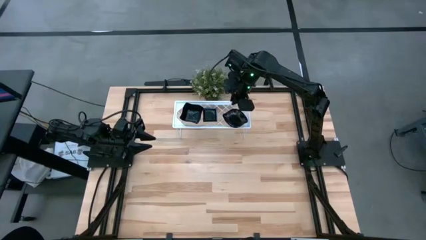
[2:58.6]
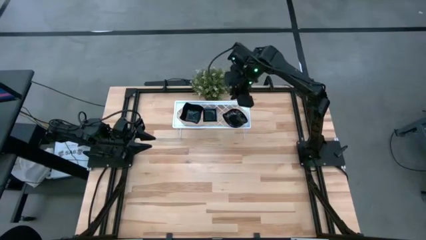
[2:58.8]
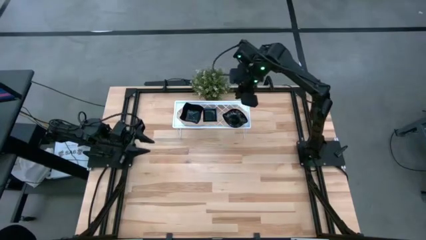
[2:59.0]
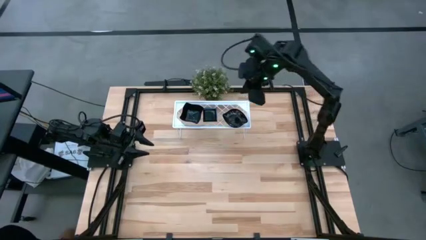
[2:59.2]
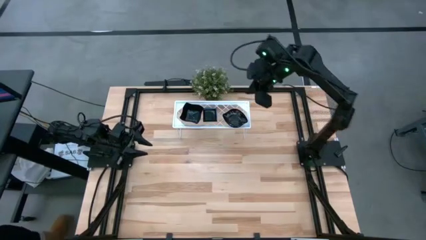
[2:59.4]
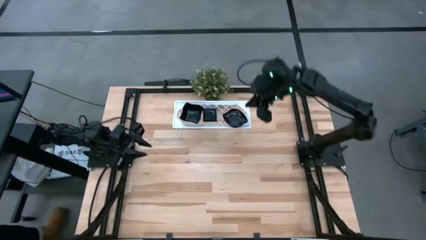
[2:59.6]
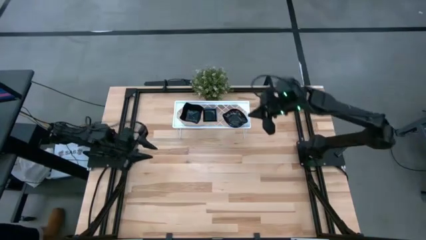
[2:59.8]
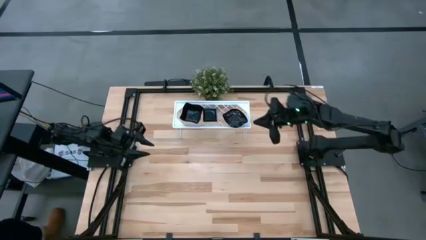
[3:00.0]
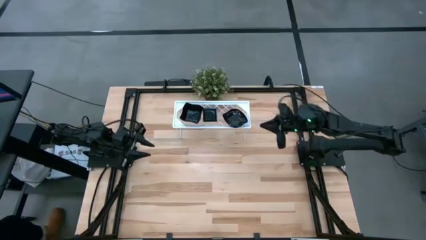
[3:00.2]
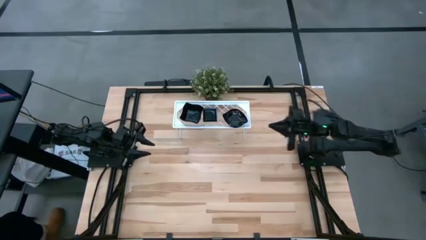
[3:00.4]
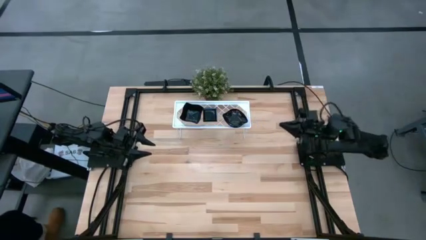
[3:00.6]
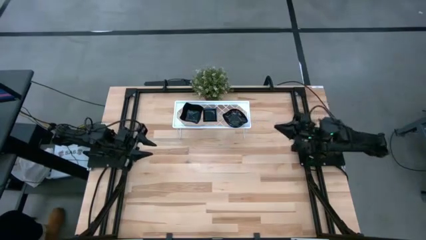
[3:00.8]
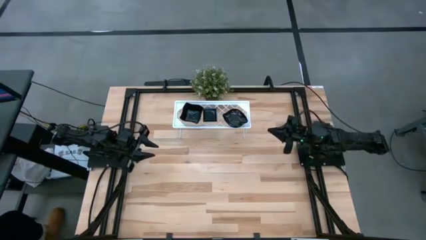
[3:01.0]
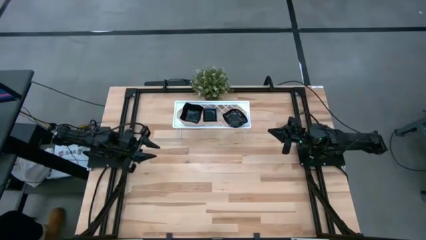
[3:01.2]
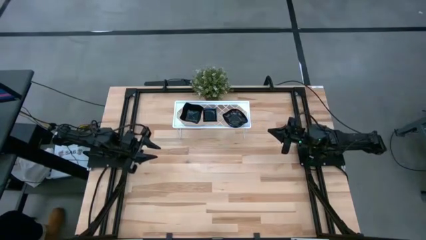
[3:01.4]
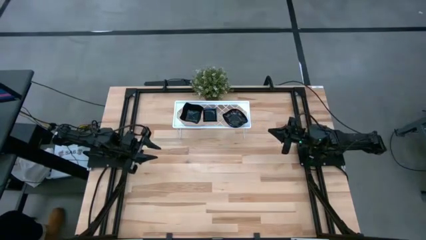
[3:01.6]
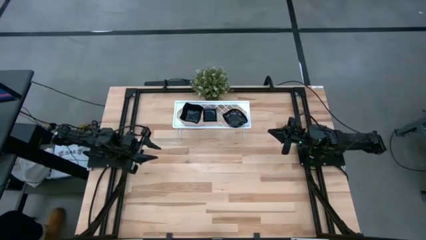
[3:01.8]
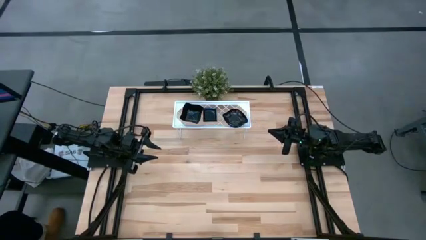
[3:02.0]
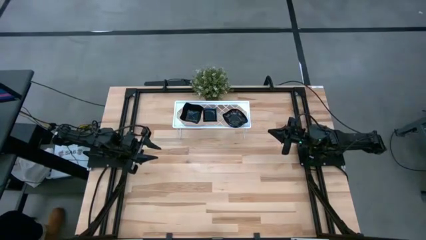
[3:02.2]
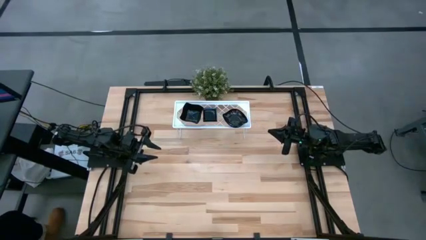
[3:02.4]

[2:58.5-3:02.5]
Task: Pick & Place Mini shaped plates
Return to Home Position

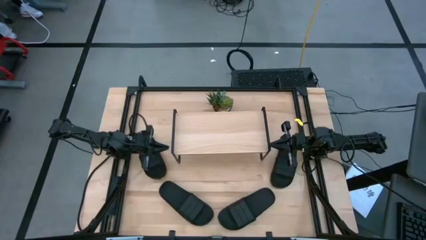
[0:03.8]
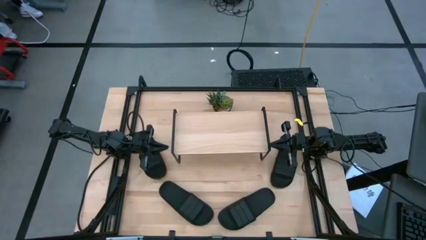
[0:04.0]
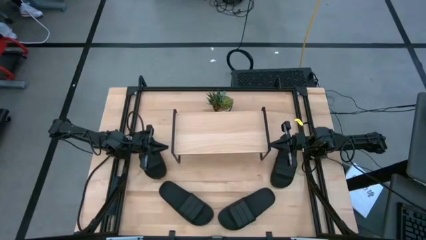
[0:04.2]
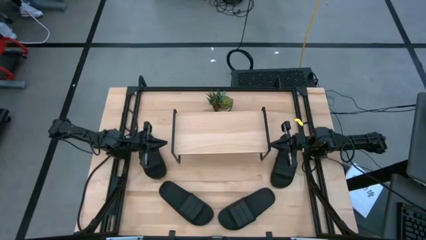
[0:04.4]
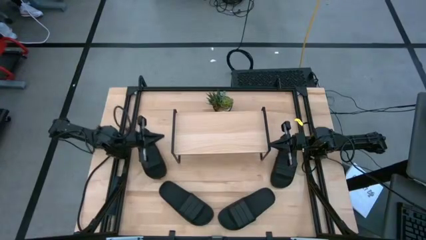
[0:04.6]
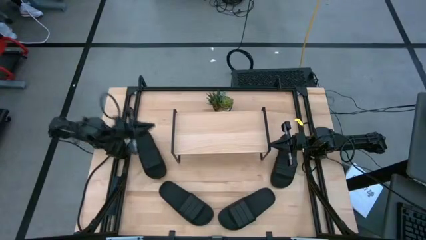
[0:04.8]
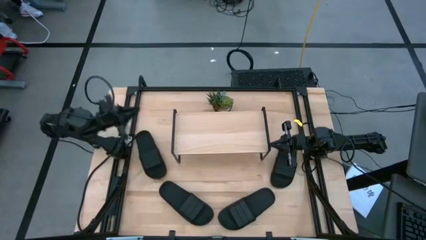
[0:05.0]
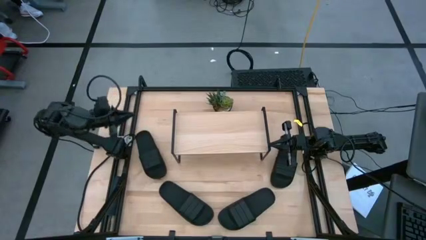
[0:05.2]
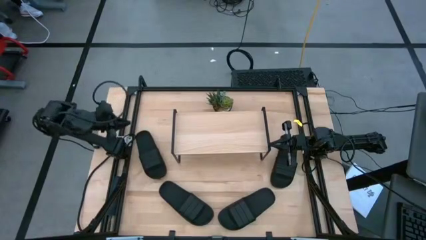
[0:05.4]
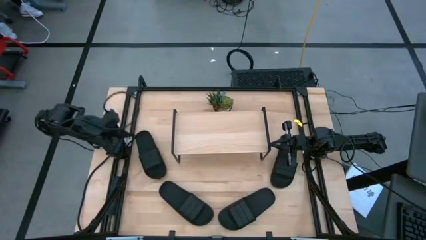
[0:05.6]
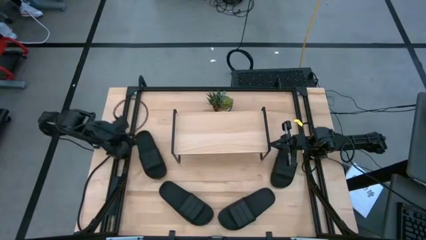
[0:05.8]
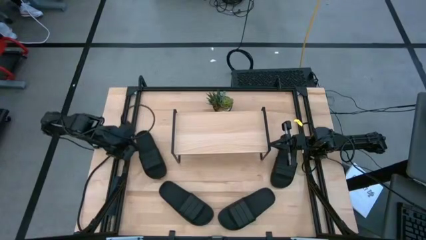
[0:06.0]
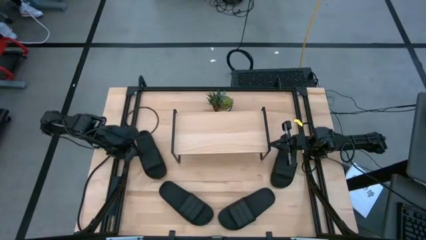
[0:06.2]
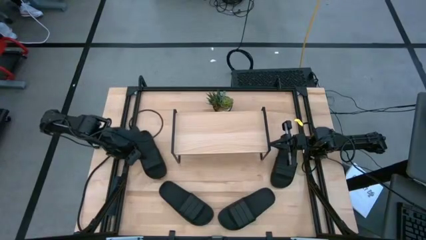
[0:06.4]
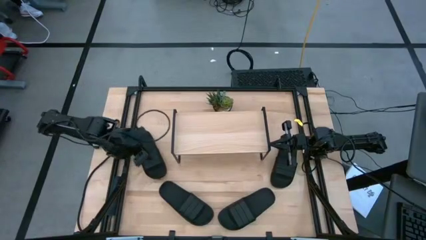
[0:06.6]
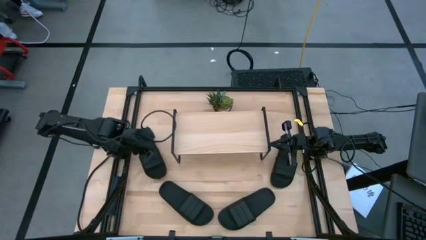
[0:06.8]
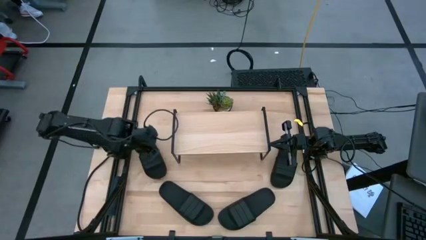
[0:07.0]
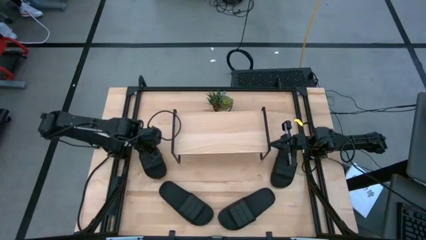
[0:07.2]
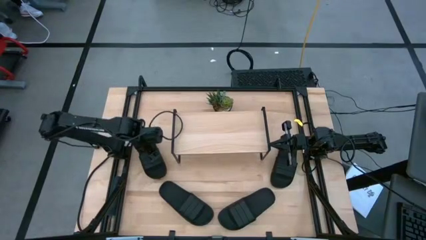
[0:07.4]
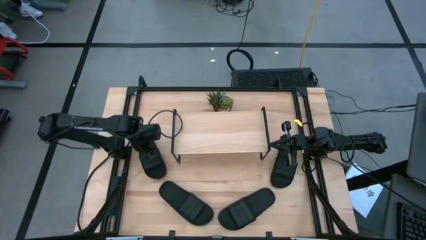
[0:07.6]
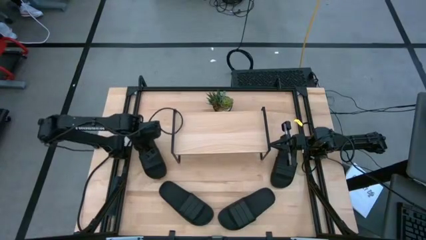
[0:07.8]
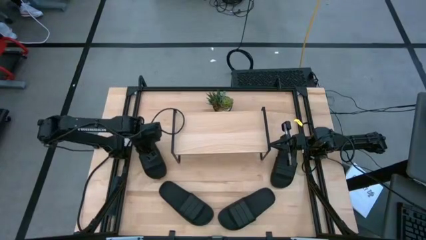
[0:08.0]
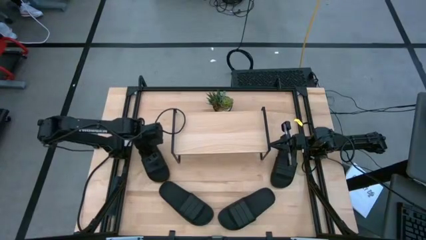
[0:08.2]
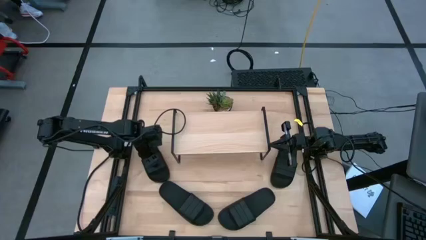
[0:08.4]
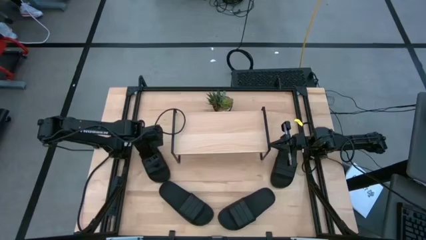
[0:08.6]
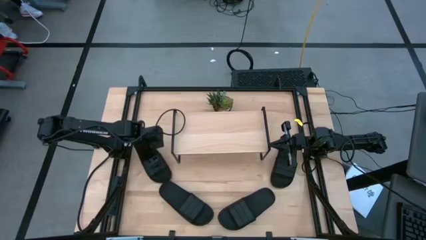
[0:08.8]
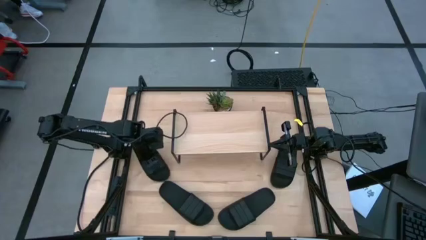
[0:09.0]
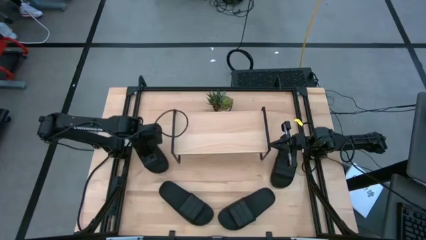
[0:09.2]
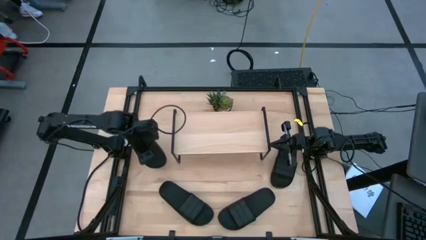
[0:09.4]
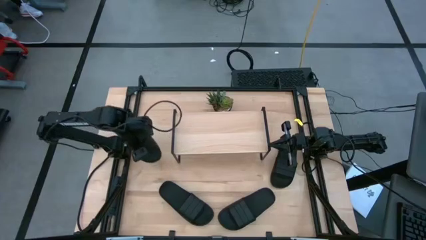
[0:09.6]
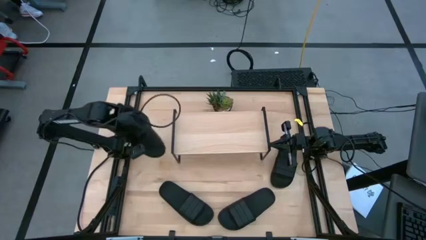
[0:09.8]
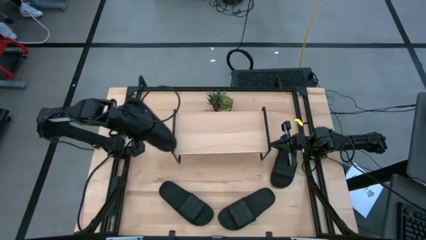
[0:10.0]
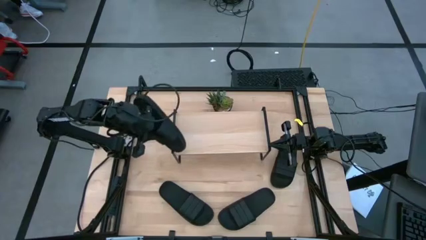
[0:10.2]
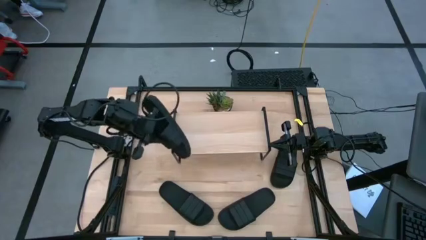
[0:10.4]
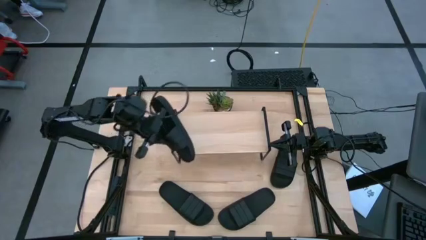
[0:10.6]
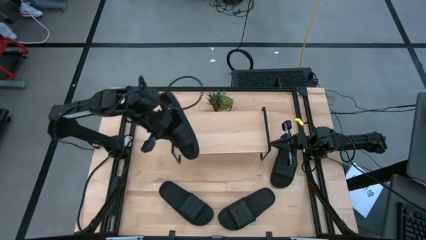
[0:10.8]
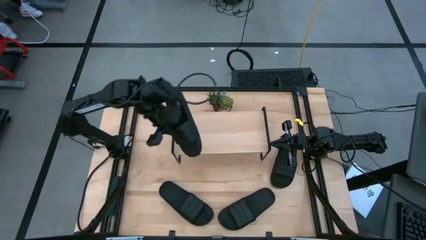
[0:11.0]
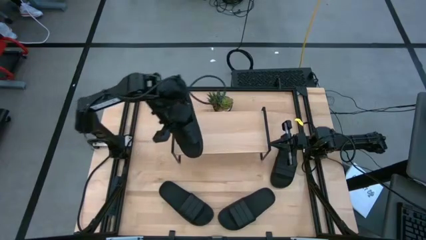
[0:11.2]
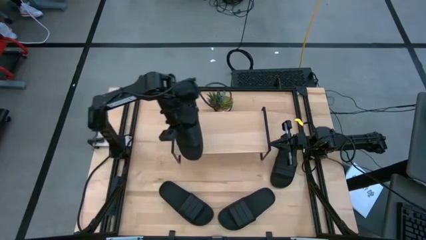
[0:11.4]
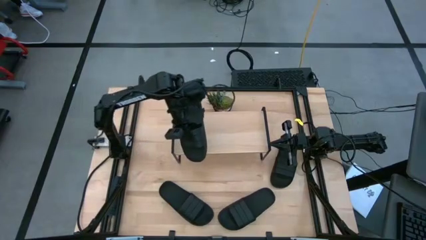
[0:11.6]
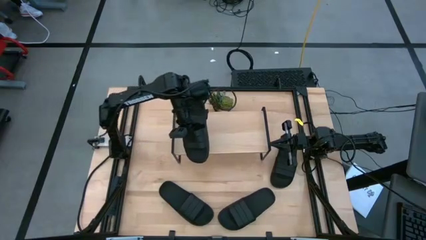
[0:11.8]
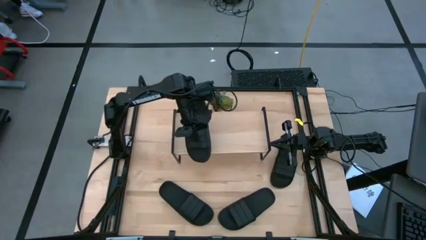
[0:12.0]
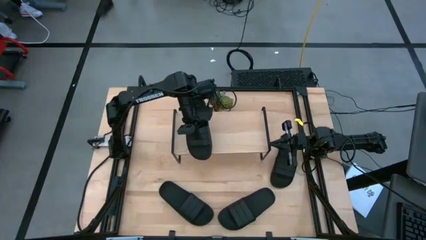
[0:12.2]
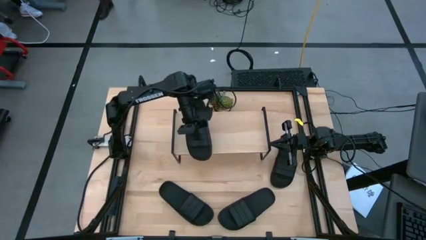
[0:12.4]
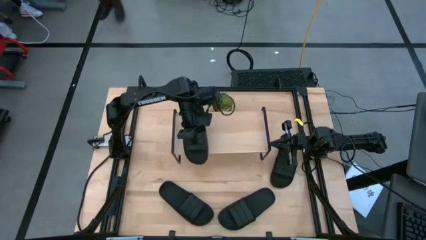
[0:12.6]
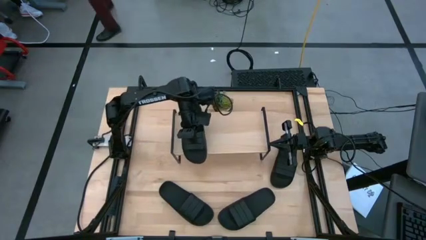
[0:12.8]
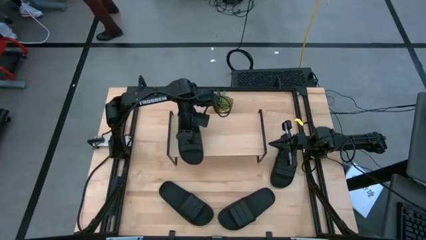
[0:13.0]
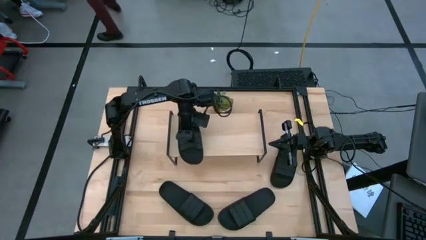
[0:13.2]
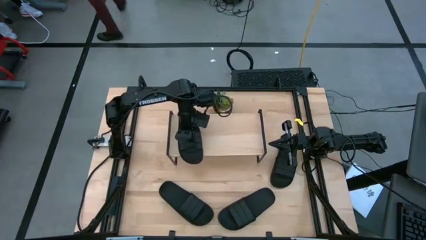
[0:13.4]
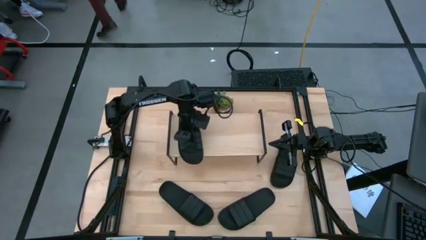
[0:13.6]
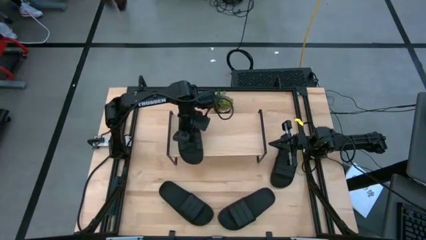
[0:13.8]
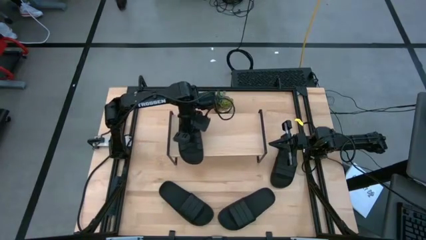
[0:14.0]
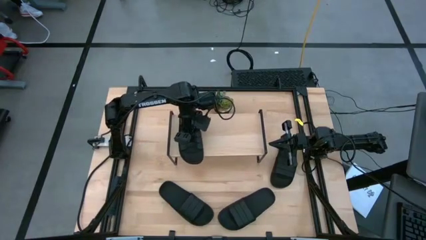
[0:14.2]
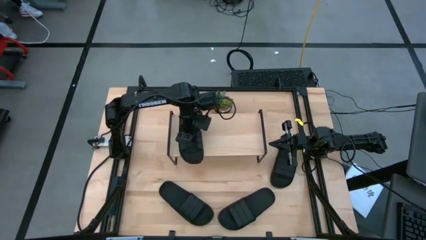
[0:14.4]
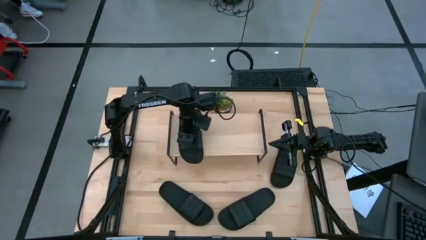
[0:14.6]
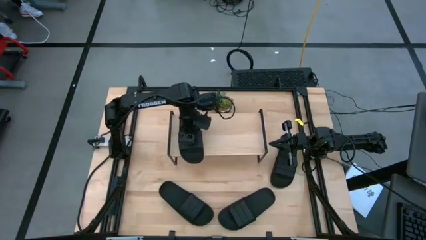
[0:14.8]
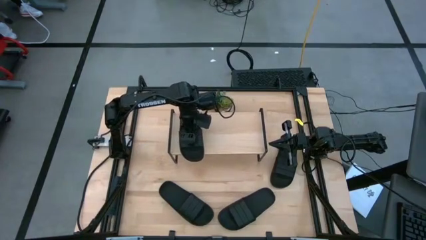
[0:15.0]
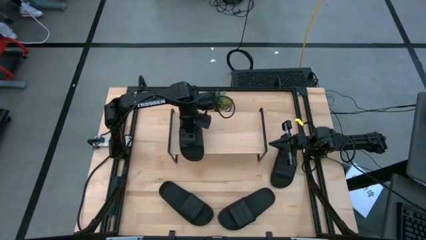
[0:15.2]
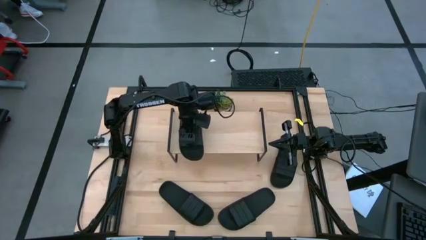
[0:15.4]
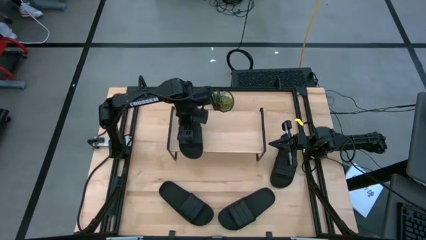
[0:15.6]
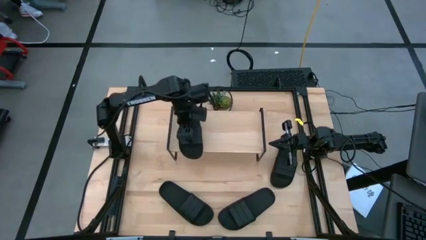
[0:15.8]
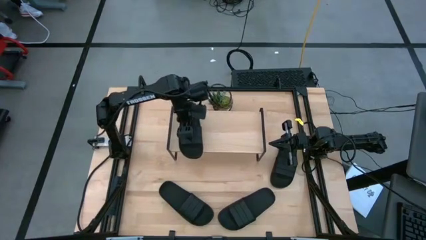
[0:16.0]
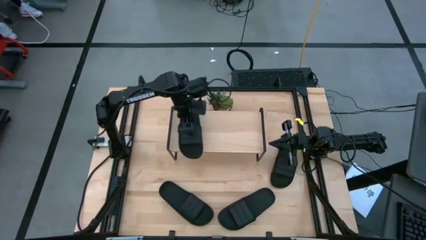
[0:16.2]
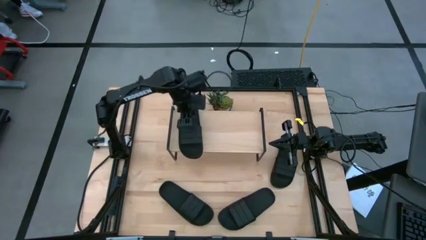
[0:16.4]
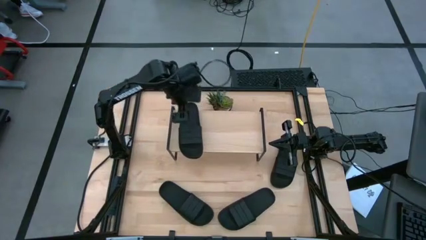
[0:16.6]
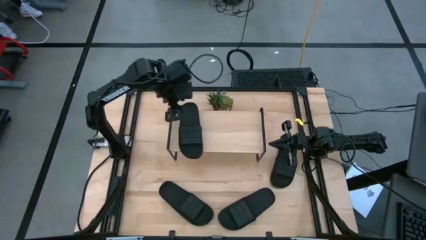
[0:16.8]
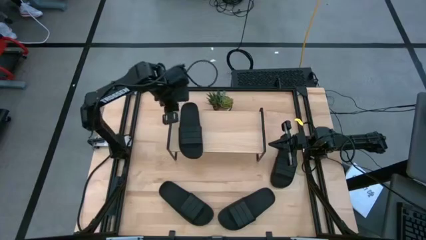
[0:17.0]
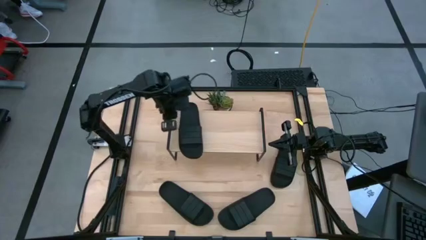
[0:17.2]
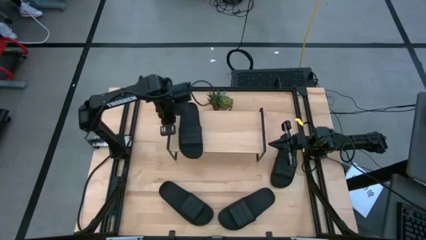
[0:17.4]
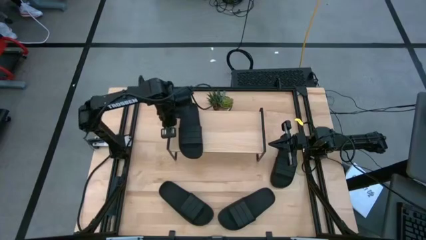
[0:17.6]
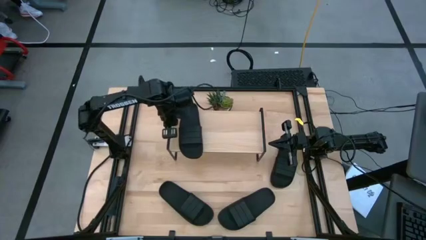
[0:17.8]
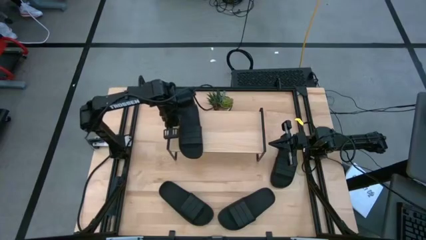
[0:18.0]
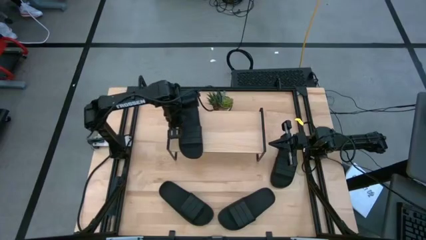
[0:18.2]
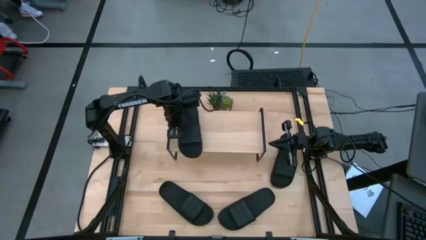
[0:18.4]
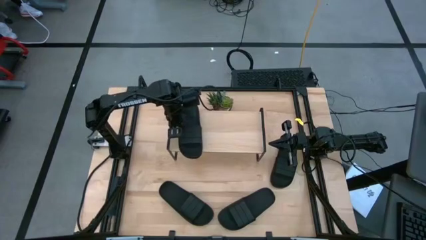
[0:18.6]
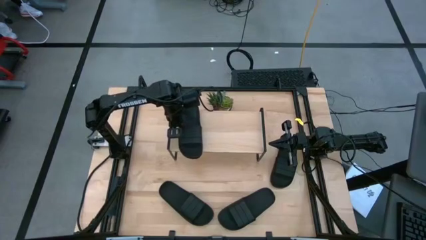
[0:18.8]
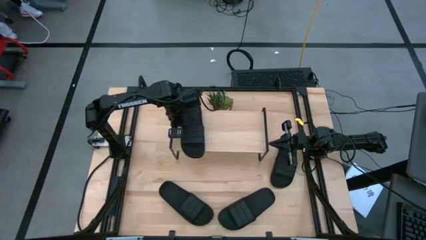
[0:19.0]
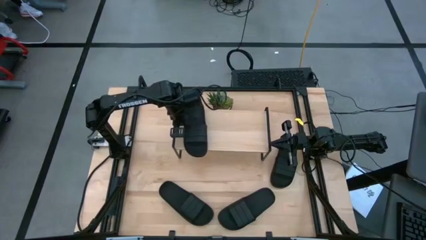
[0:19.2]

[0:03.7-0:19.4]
Task: Pick and place slides into the shelf
Put the black slide on the shelf
